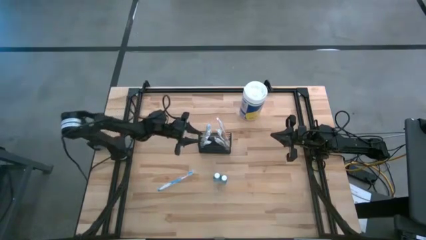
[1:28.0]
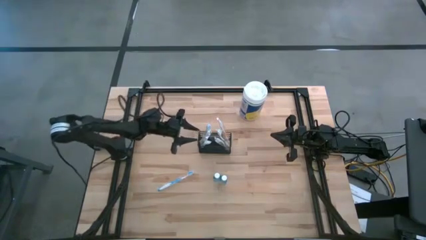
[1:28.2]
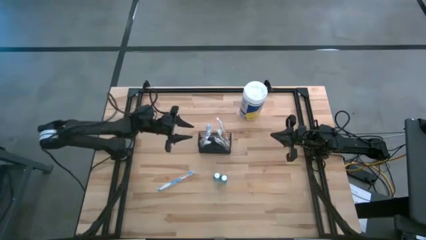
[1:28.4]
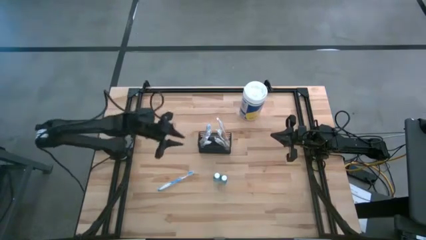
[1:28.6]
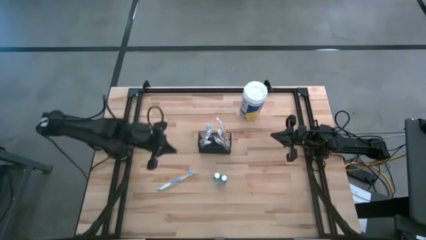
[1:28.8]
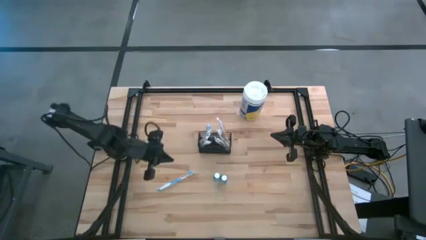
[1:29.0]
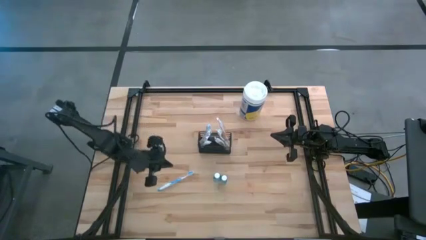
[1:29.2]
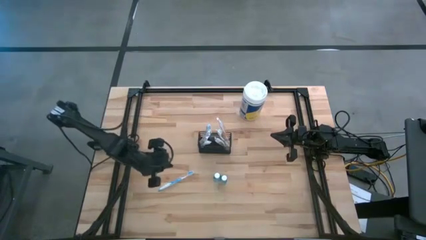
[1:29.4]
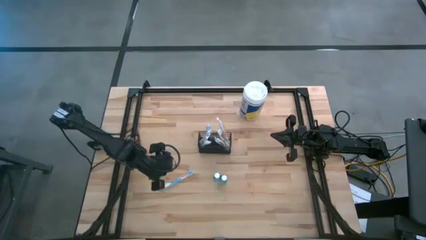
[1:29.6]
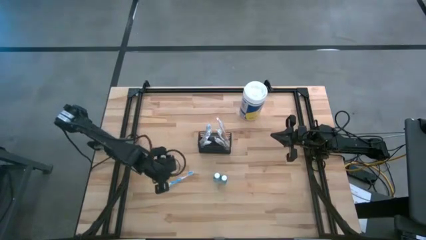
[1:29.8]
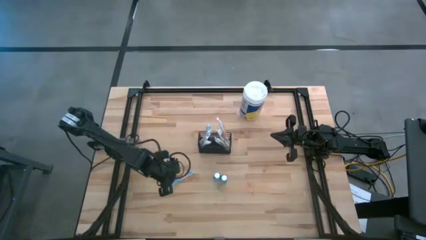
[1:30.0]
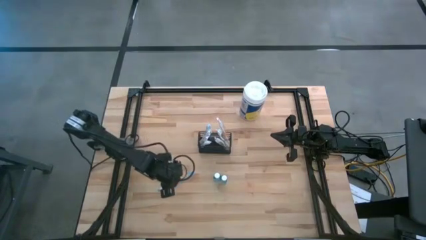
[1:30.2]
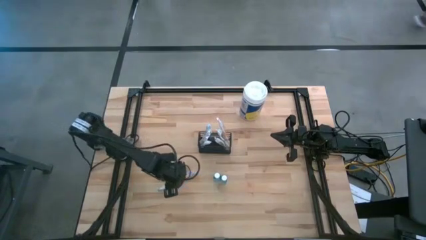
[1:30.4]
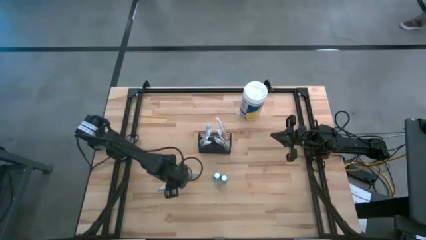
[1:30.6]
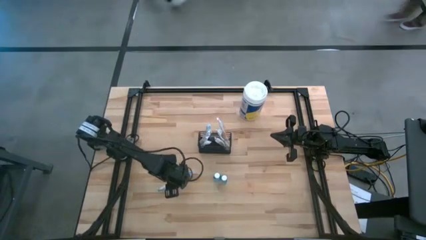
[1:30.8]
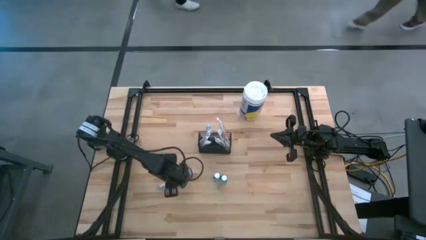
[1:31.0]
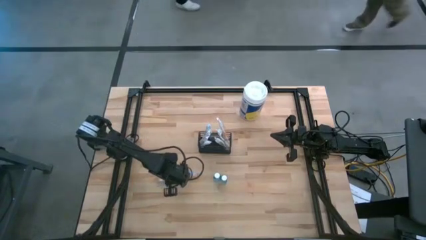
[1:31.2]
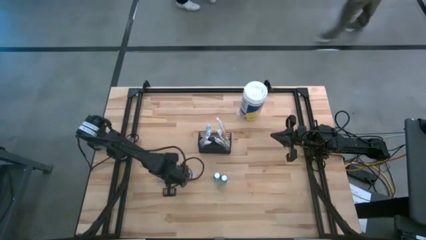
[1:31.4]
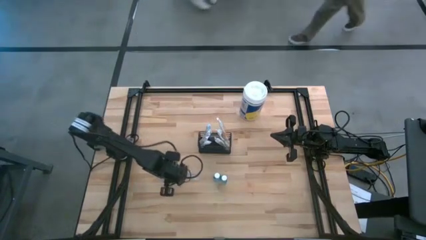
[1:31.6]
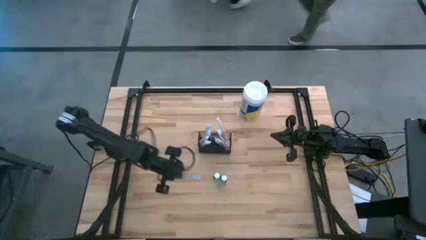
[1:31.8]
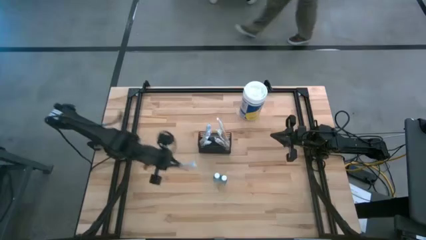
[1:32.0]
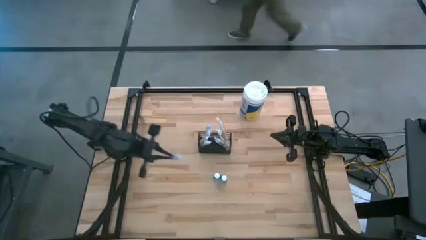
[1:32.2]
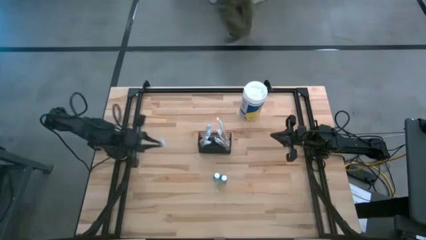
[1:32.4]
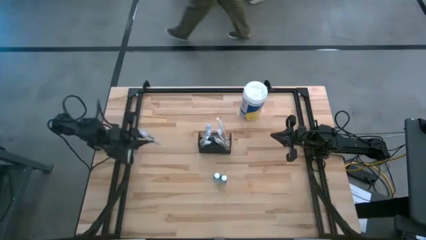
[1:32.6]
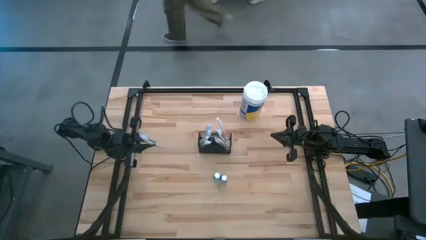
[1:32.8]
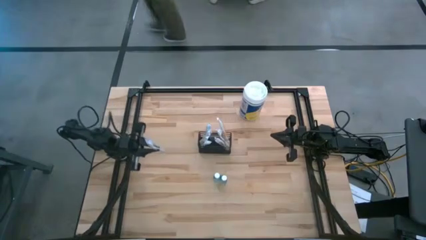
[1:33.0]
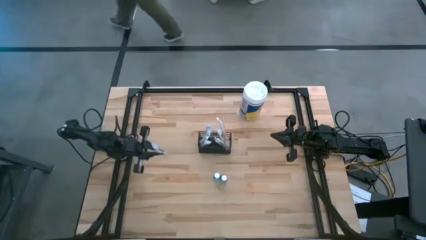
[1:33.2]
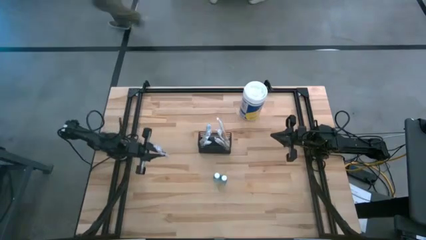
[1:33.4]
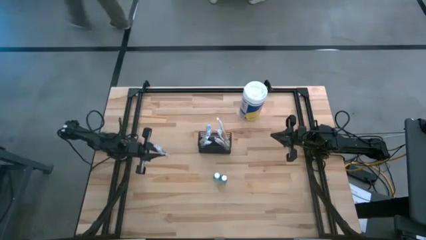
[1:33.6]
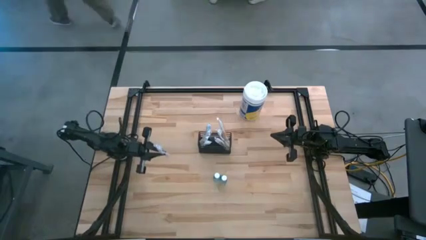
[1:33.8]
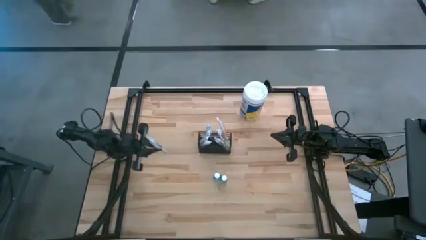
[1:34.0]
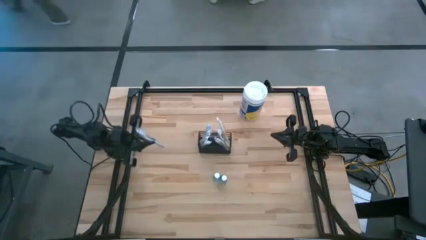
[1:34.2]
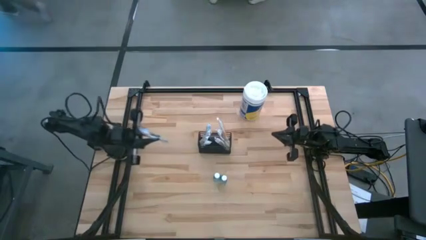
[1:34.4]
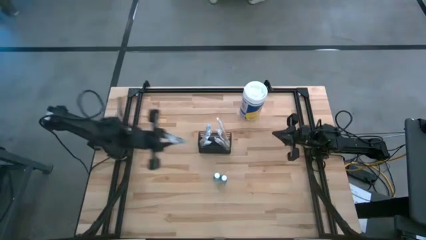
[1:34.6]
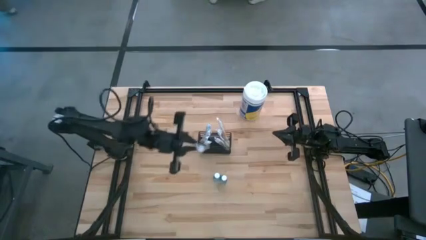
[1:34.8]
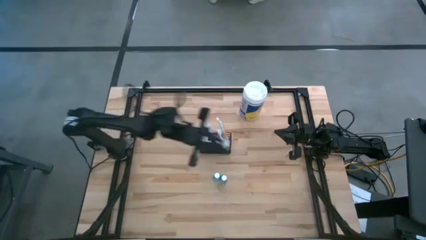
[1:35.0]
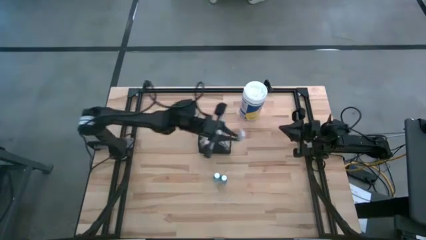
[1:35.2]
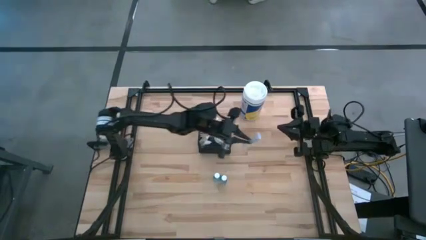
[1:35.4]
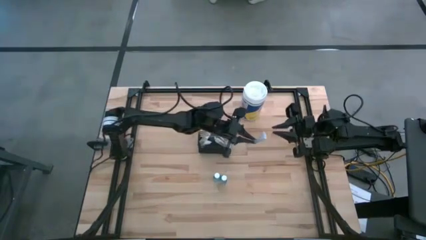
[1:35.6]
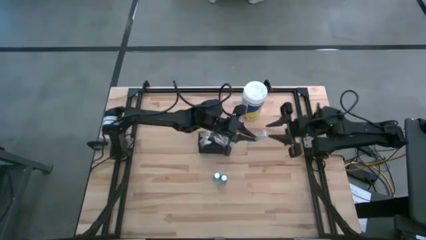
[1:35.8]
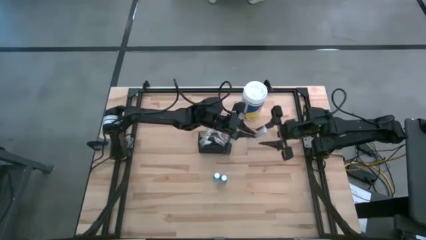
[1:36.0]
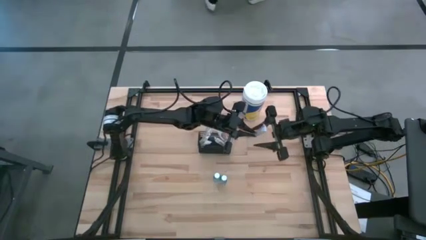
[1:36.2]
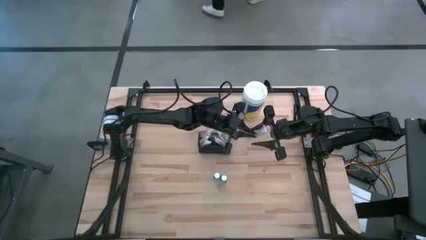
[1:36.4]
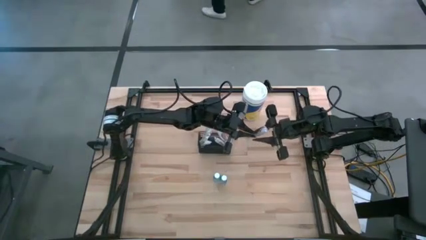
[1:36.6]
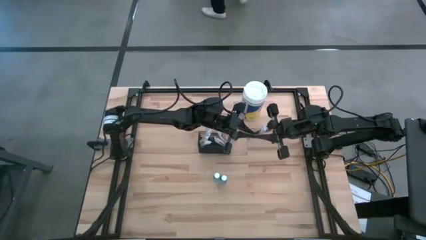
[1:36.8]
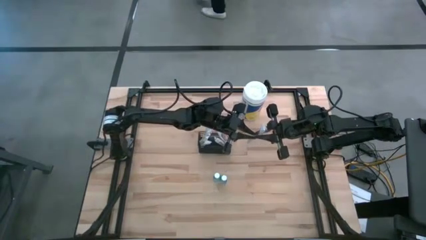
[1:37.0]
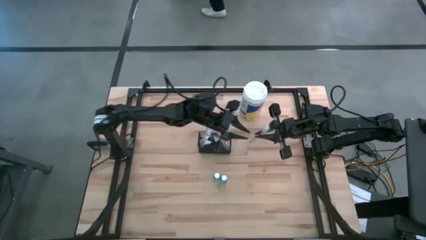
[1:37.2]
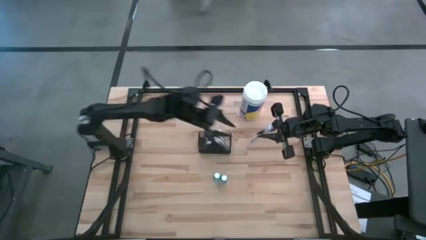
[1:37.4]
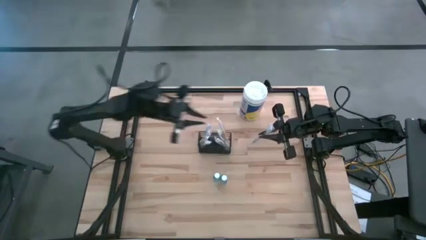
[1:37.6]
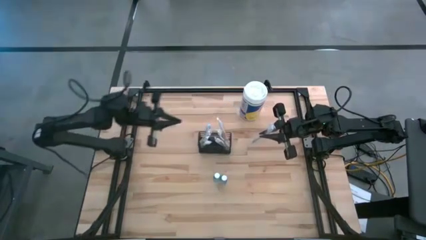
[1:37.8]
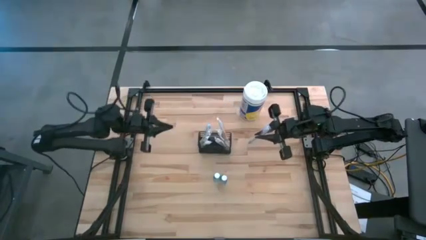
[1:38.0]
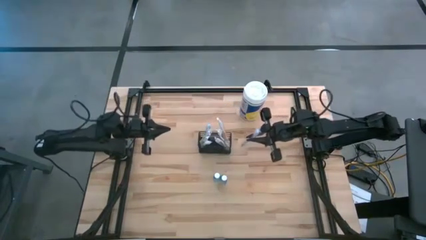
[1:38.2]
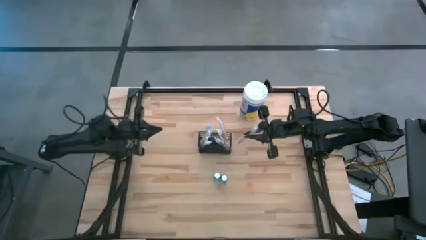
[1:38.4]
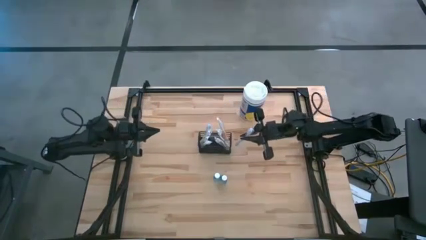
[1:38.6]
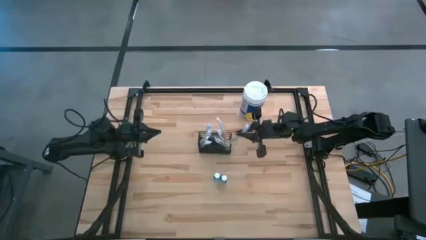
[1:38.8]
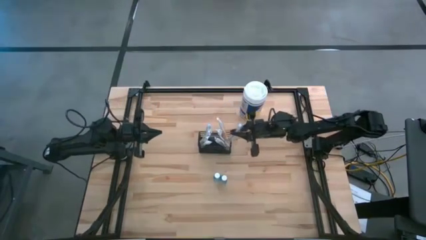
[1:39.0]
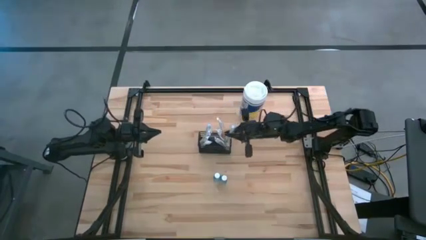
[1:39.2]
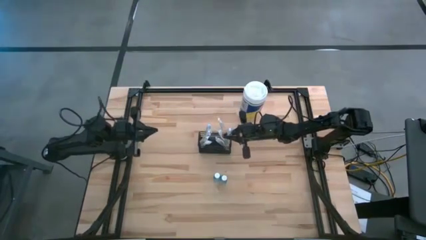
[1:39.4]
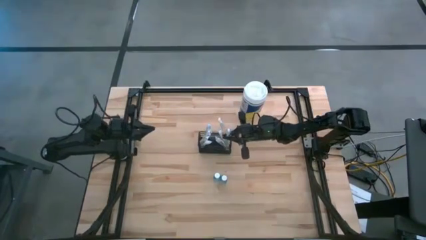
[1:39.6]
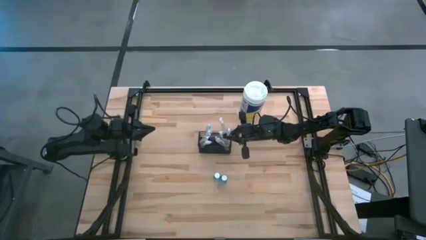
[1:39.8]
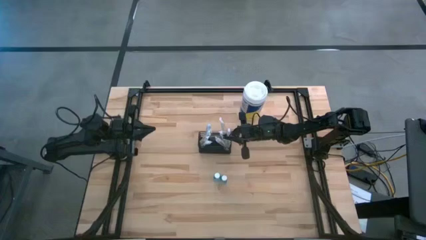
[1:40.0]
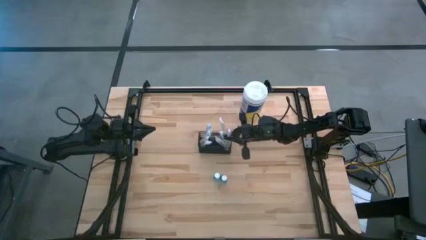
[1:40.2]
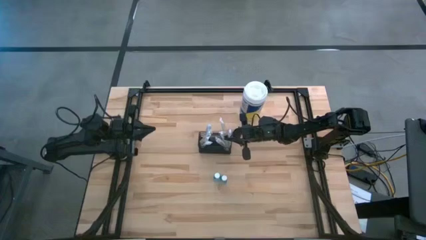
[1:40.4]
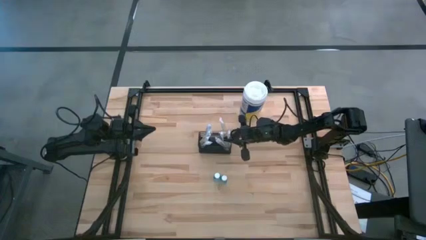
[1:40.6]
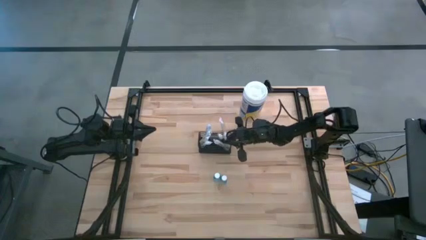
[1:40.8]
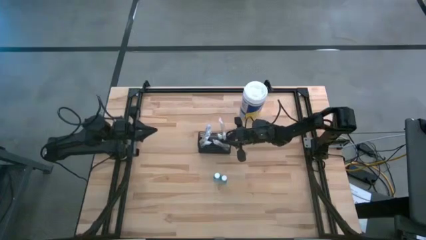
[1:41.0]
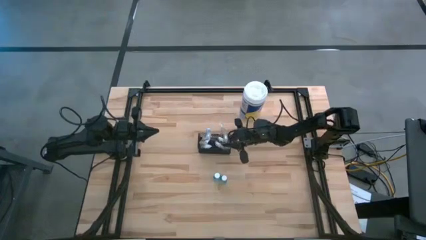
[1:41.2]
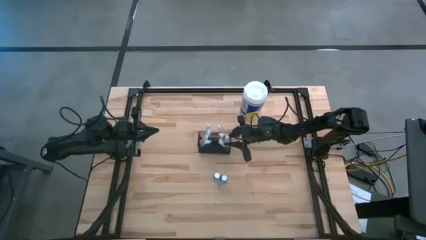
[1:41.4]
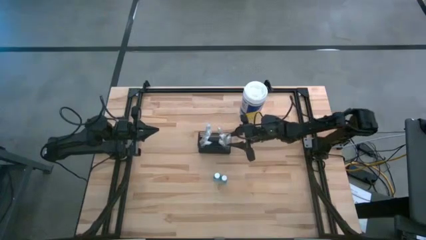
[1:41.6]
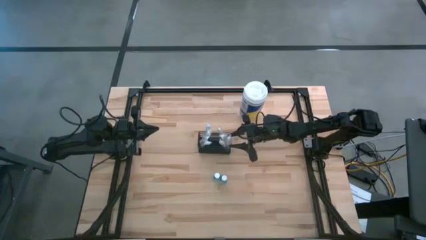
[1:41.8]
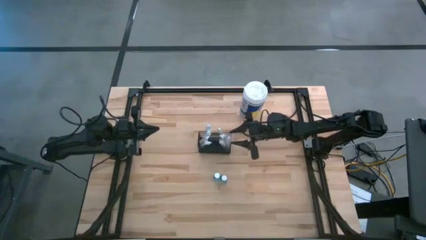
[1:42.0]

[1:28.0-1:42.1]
Task: Pick & Place toothbrushing station
Put the blue toothbrush into the black wire organizer
